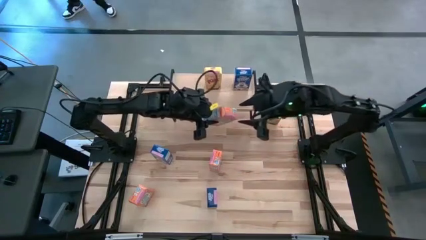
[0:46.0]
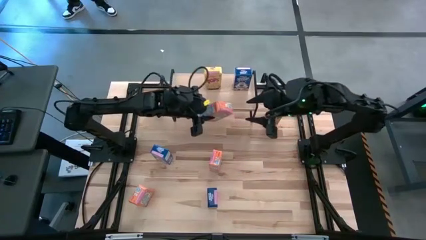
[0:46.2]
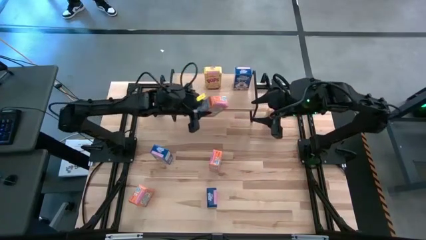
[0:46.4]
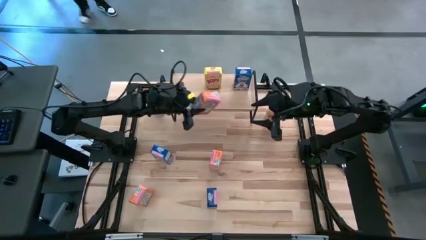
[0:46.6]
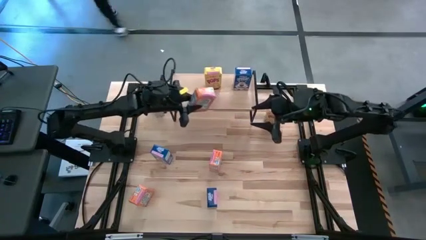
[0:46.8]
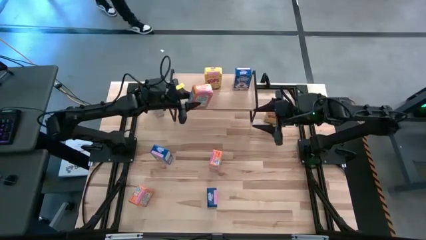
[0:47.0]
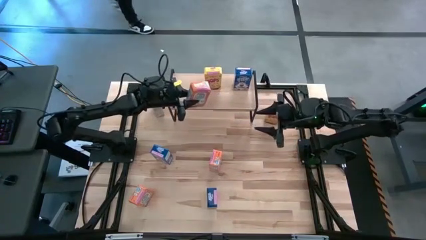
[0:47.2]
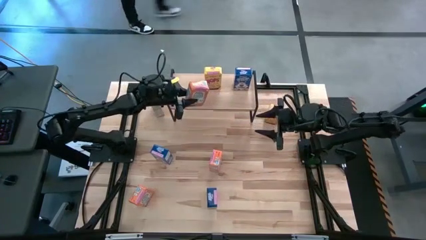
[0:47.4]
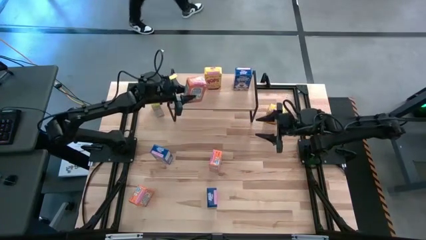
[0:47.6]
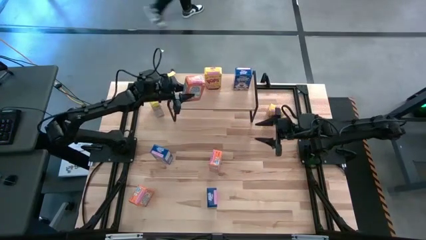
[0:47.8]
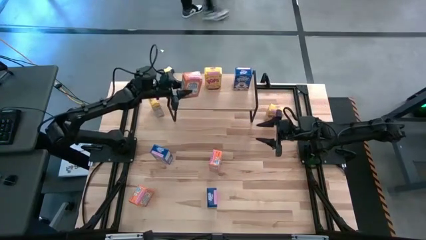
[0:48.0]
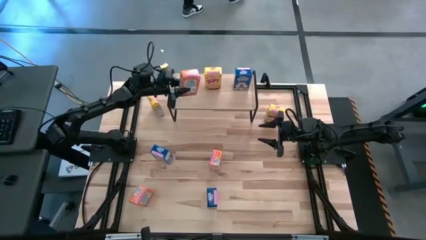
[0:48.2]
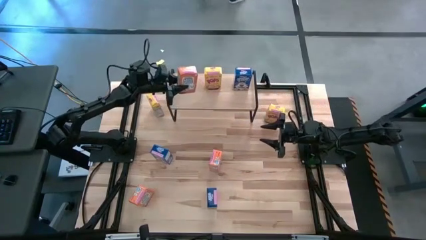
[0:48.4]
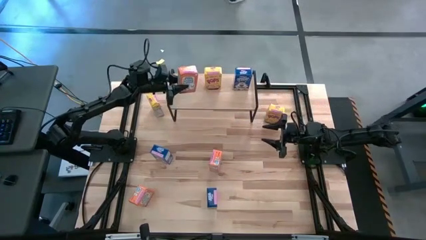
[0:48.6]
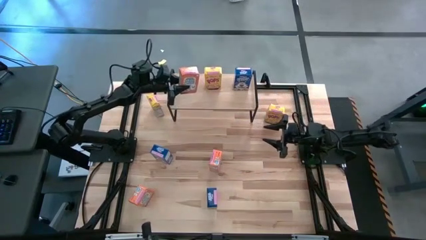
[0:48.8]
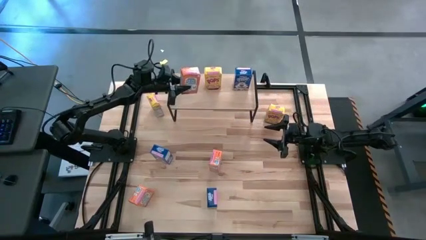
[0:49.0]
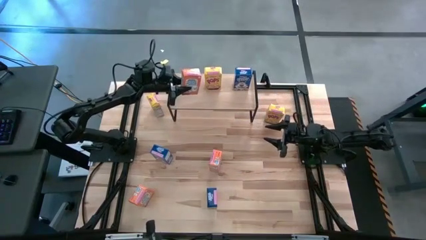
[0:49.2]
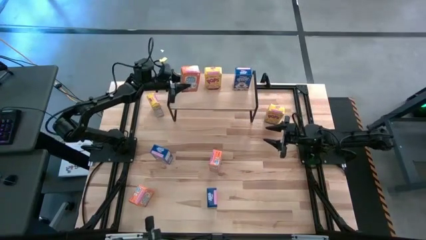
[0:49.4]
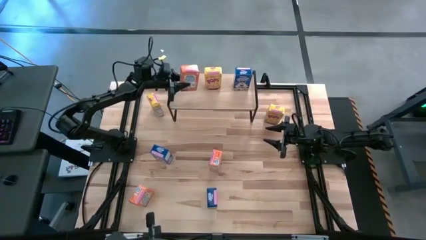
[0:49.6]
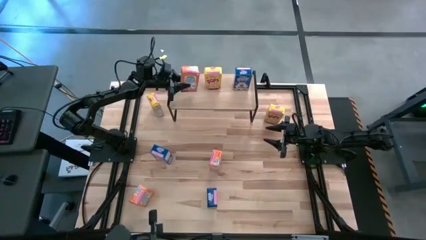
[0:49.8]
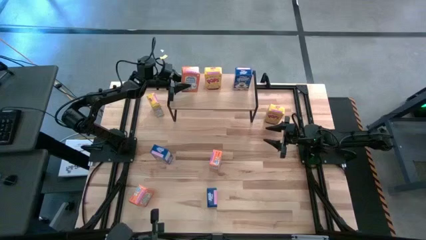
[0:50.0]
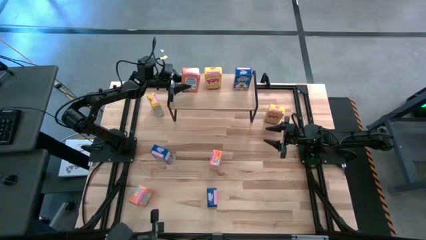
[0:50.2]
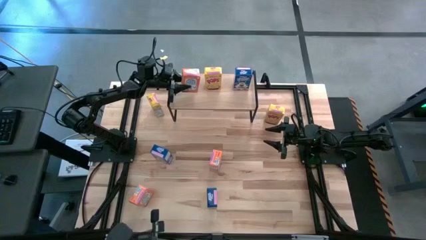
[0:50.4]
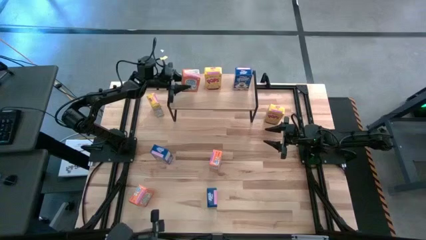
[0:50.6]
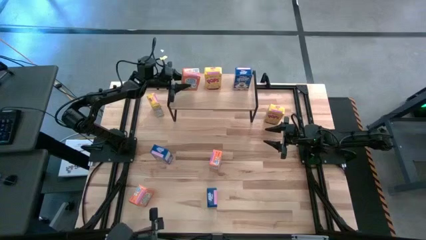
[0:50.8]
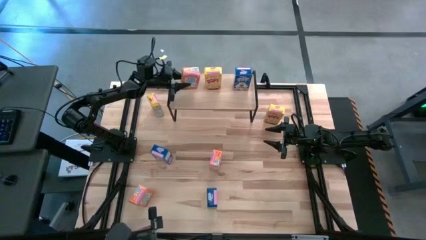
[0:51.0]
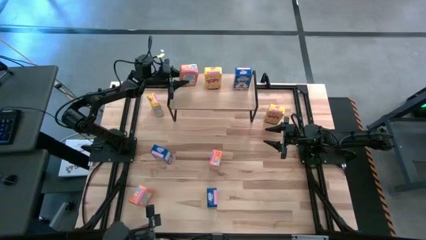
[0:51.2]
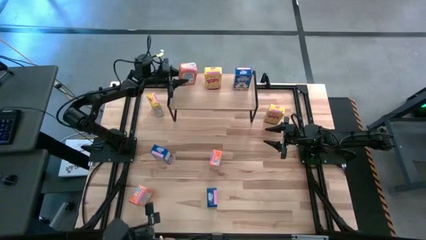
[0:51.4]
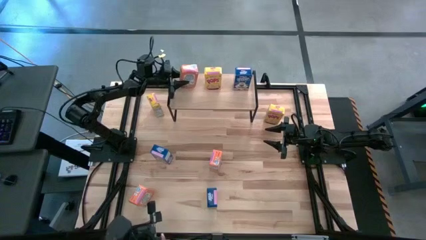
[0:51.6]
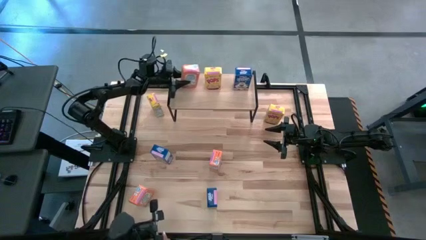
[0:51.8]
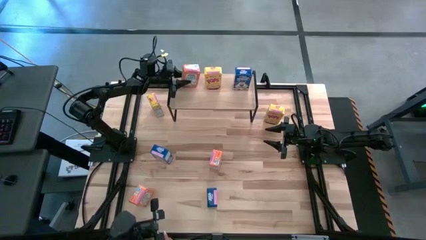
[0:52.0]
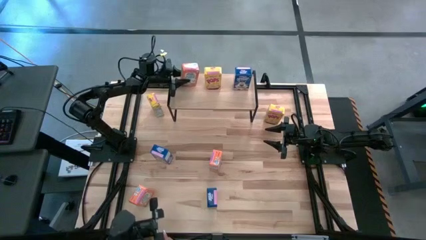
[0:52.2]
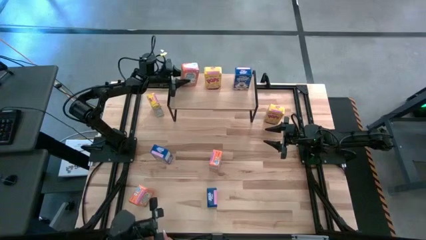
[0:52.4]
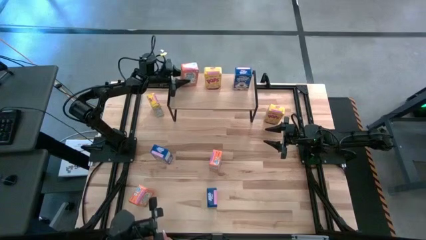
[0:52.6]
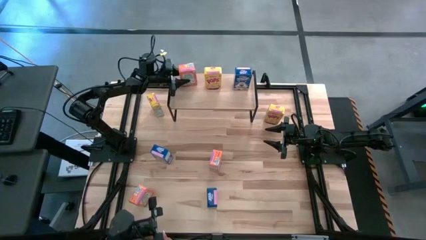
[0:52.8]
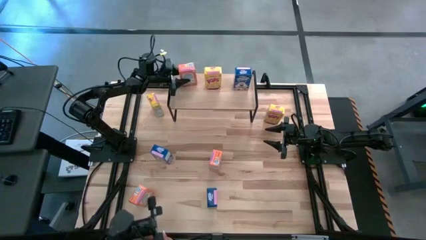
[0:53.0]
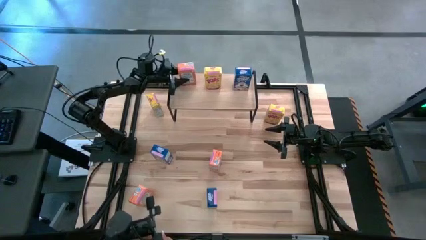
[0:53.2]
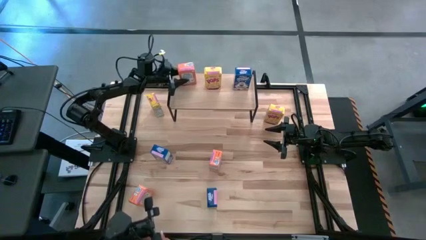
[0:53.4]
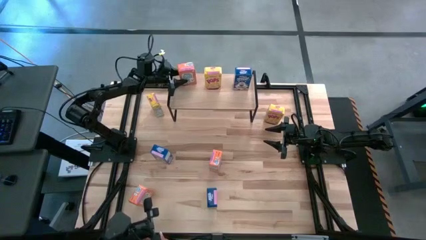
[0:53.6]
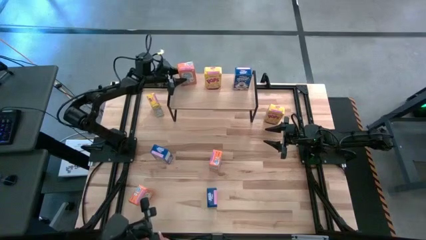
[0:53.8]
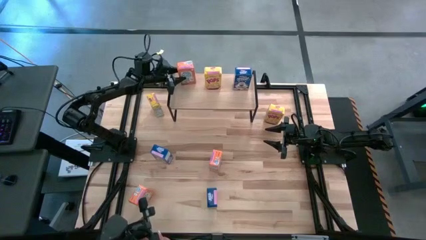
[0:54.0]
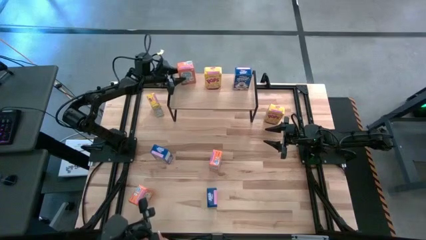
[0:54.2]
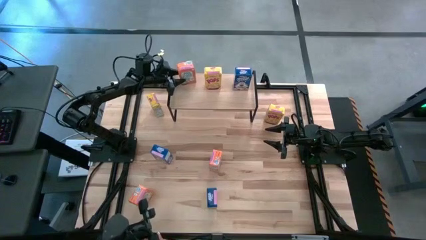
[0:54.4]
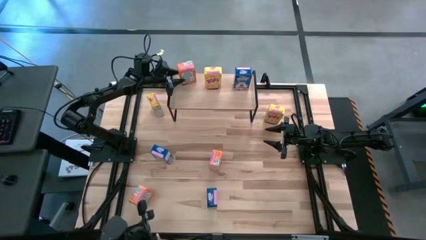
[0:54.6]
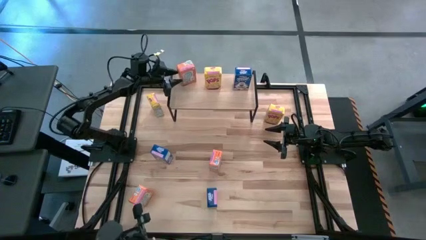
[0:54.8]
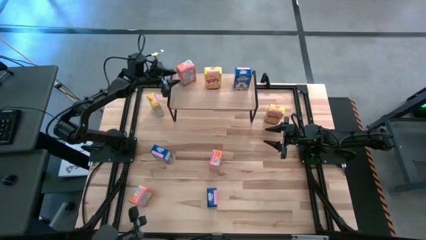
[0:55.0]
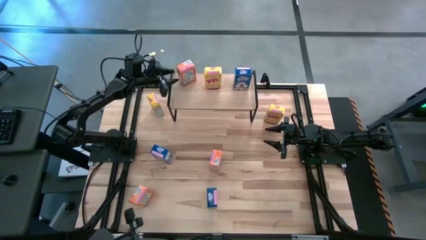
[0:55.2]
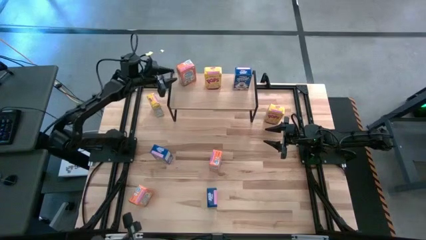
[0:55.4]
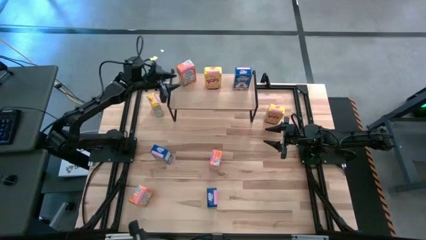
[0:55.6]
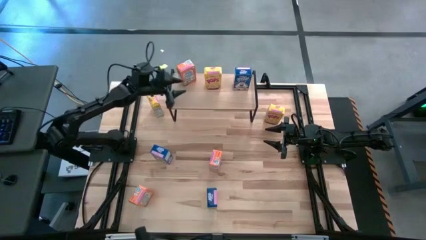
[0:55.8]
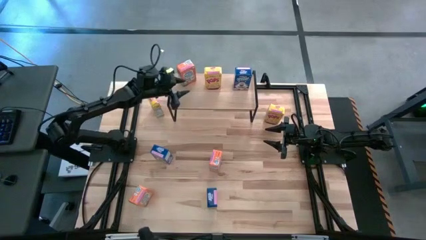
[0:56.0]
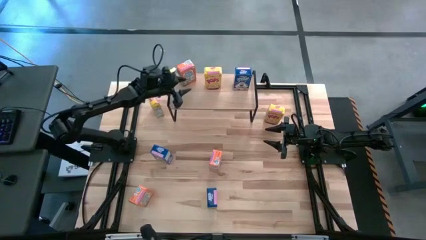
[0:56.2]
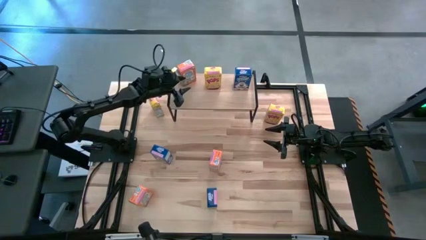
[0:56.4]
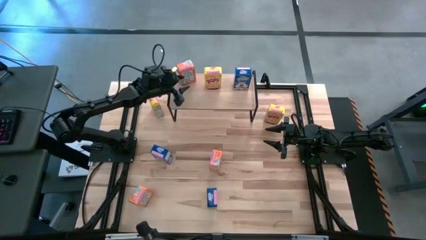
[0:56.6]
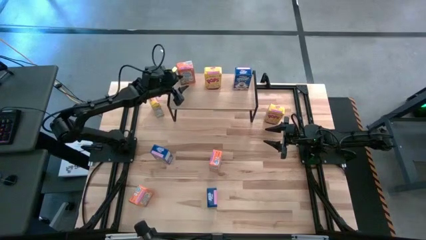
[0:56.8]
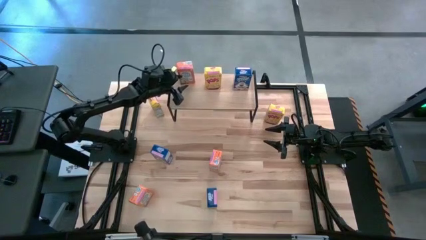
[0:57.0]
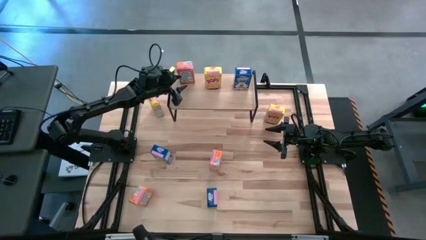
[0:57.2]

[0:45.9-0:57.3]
Task: Stack cereal on shelf
Put the bottom right orange cereal box on the shelf
